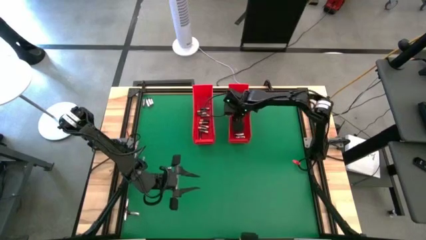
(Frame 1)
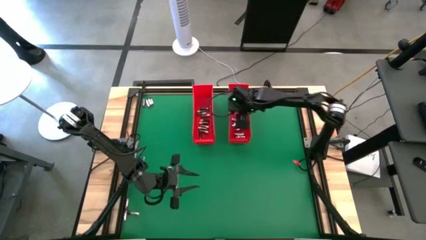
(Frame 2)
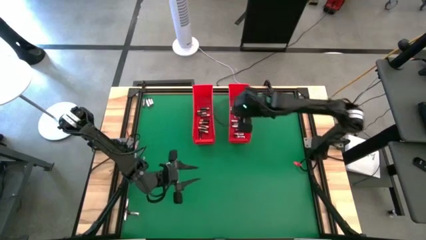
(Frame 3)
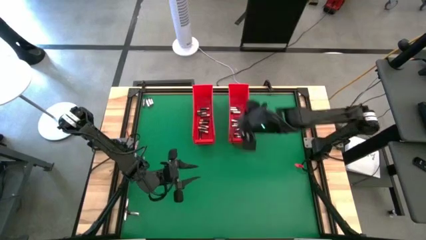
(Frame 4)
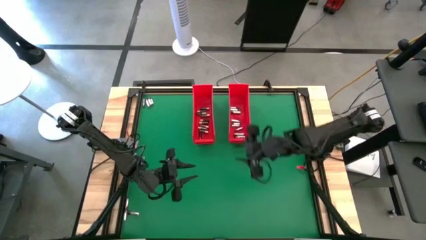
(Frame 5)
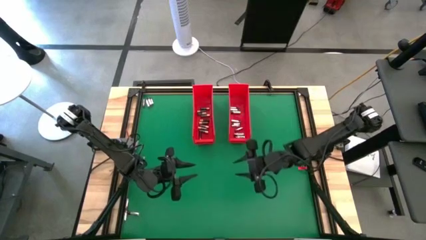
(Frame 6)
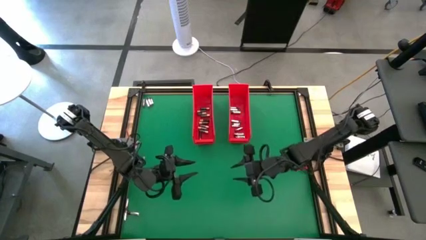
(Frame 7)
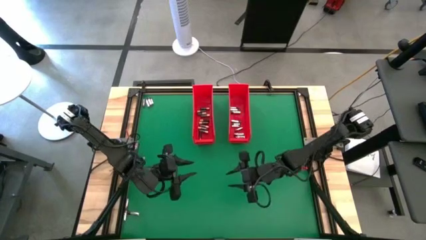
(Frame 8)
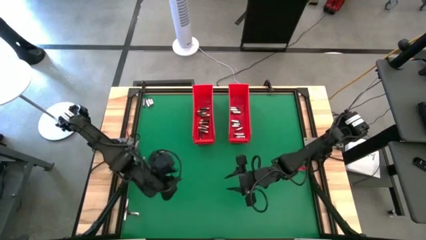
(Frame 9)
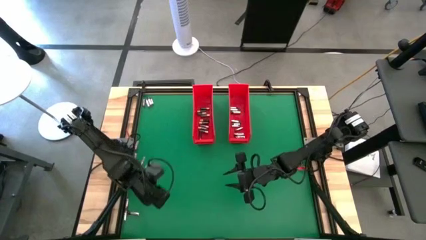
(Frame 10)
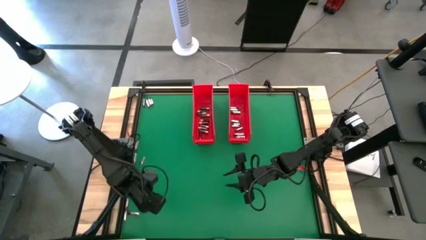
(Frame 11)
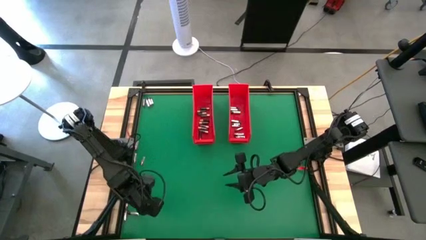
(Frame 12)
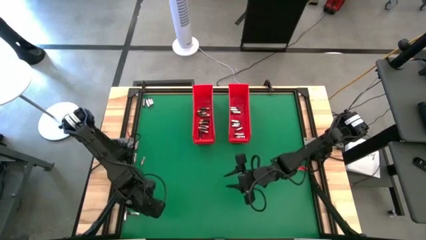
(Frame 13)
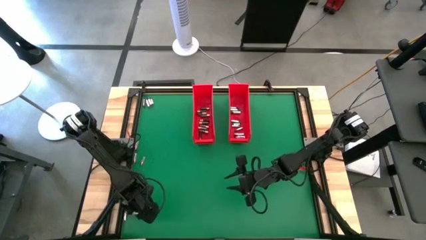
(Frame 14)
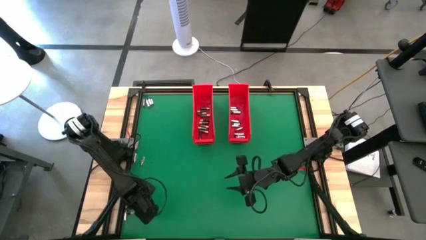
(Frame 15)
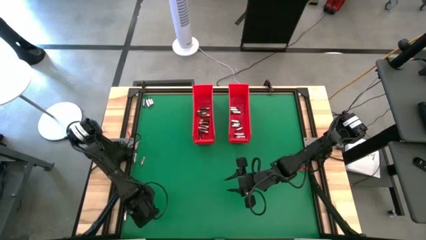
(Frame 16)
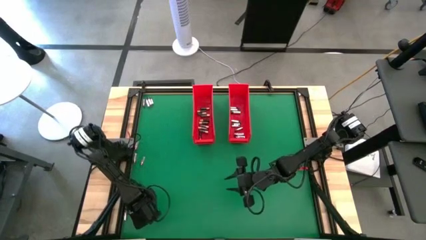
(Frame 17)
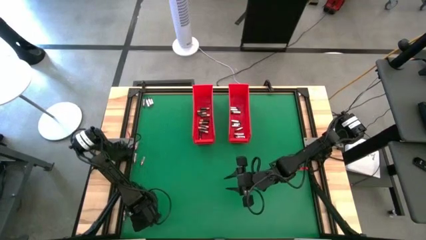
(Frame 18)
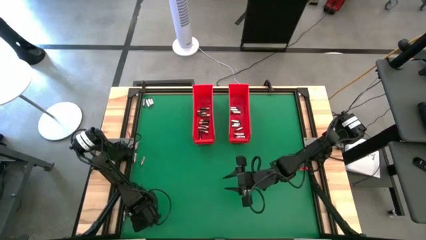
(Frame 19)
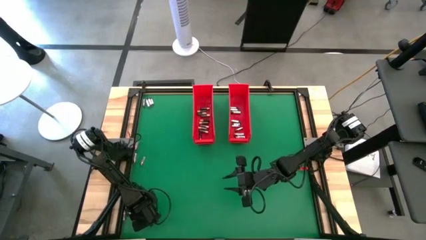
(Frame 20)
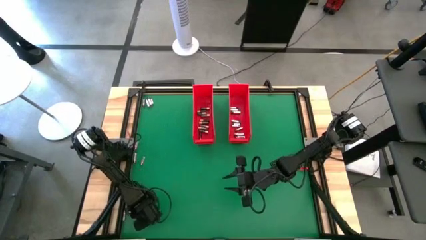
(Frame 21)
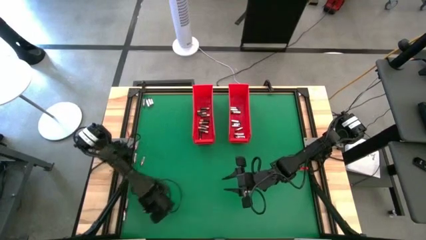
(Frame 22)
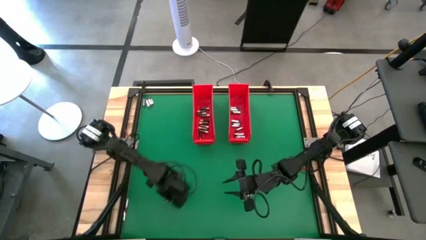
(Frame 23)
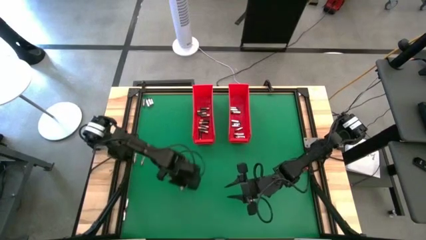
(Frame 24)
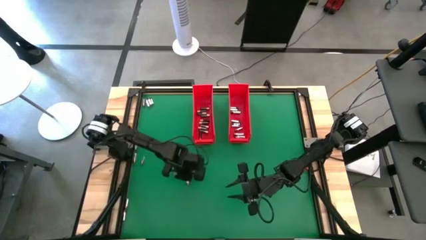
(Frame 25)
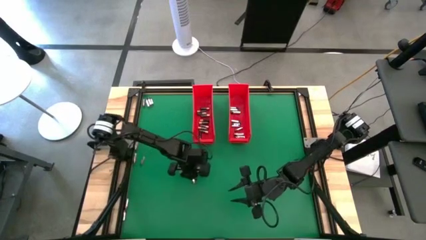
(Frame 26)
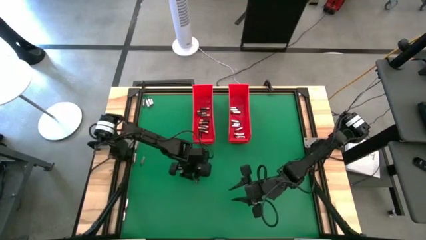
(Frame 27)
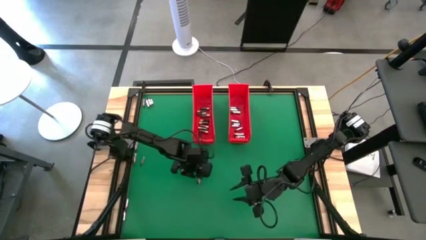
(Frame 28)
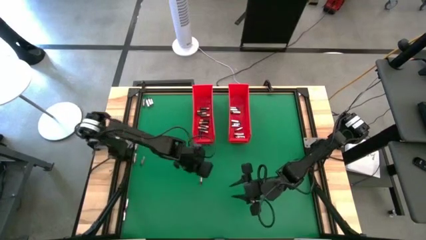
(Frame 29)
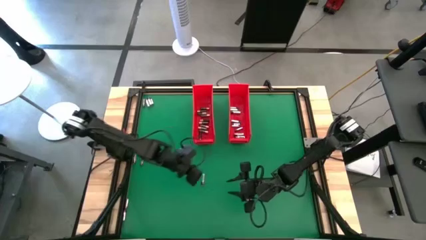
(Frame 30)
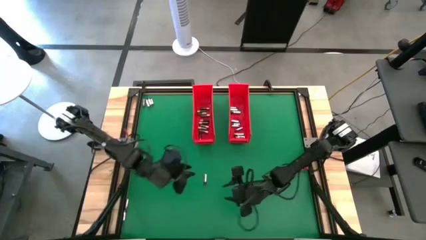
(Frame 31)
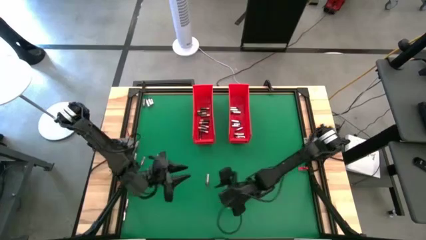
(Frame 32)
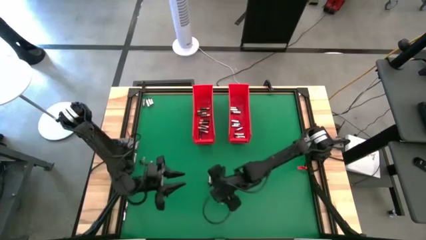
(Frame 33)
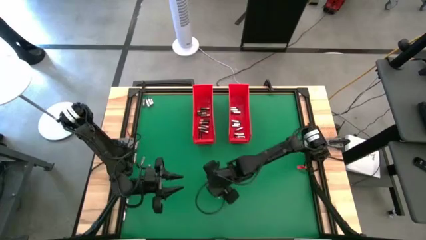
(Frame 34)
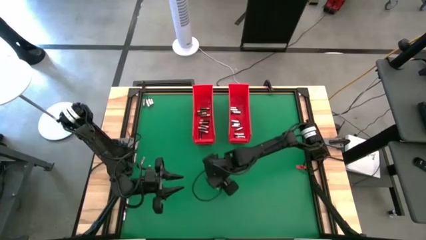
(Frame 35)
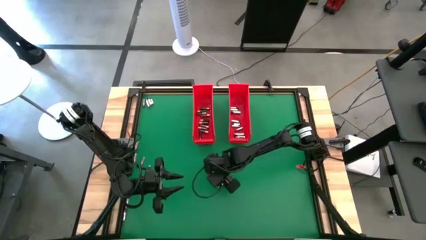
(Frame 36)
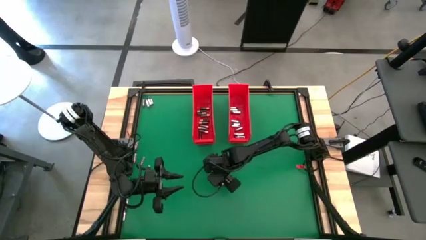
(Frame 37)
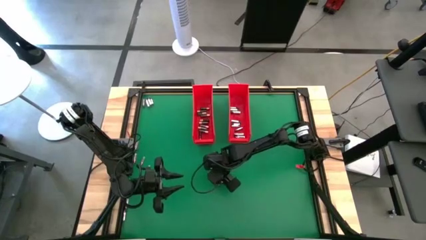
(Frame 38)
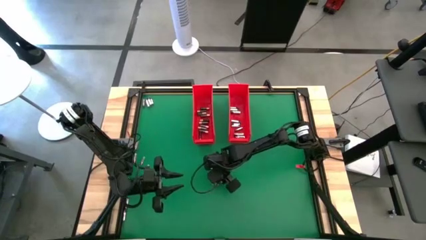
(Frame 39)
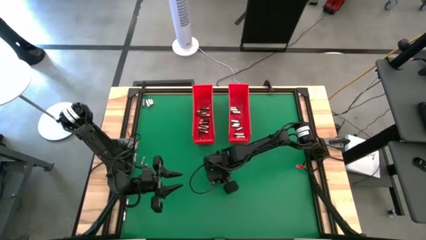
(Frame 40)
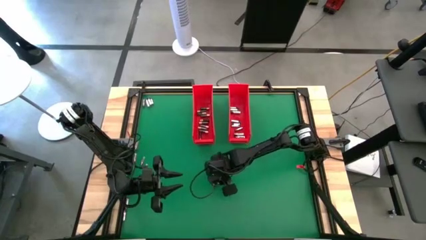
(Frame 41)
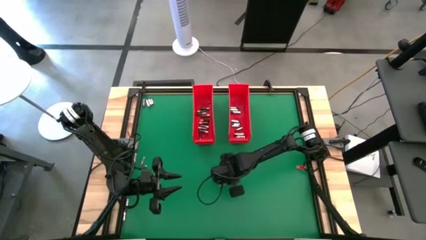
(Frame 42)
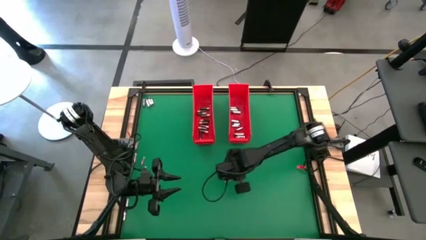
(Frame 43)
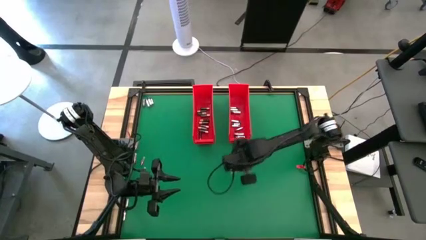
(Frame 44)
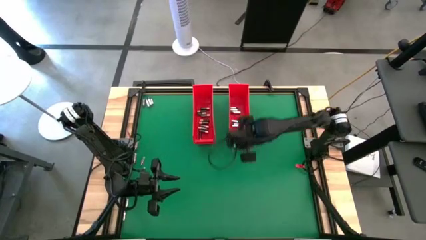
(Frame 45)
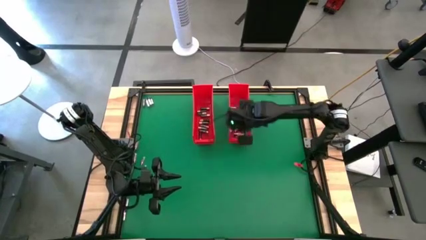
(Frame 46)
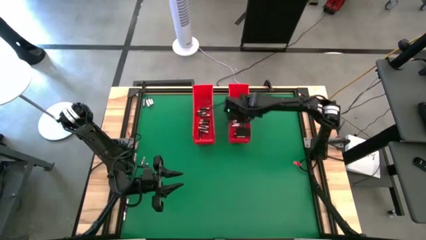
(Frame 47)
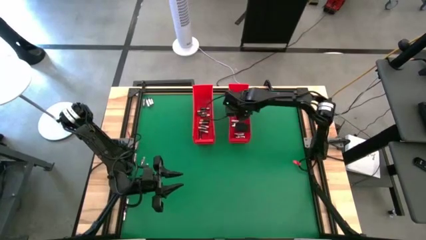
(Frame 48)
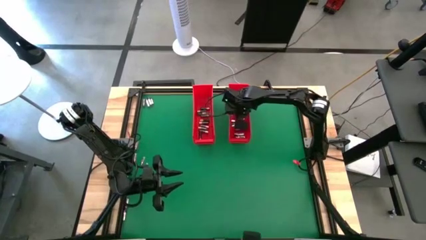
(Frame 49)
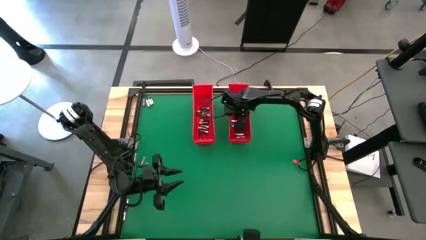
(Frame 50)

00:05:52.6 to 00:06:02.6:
Task: Sort batteries
Put the silver battery into the right red bin

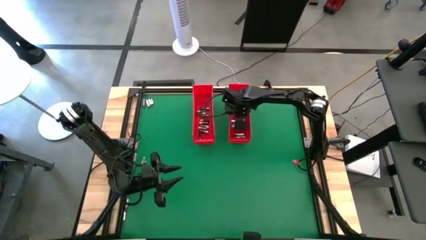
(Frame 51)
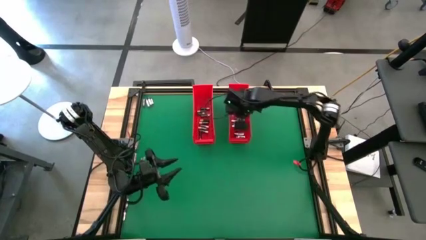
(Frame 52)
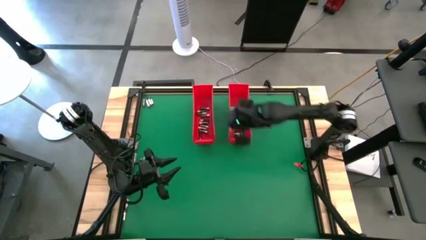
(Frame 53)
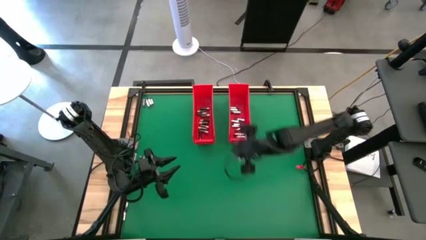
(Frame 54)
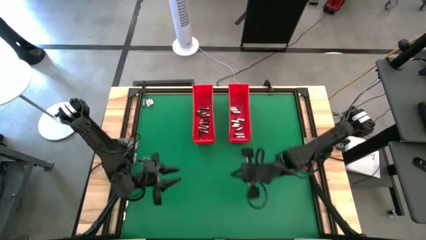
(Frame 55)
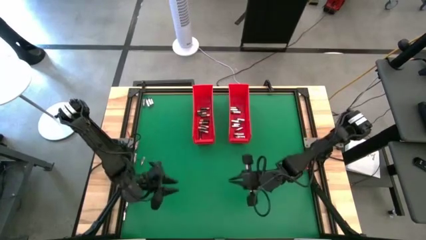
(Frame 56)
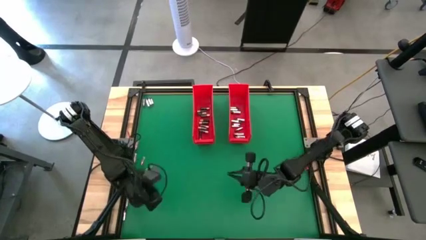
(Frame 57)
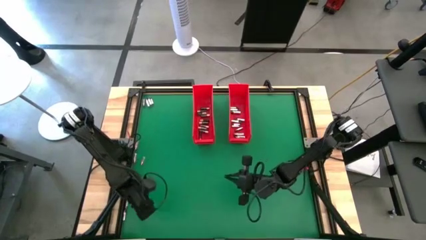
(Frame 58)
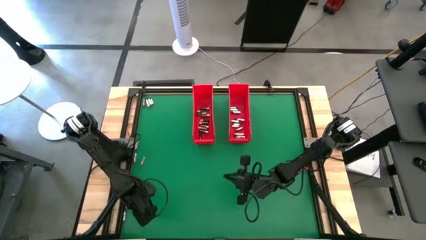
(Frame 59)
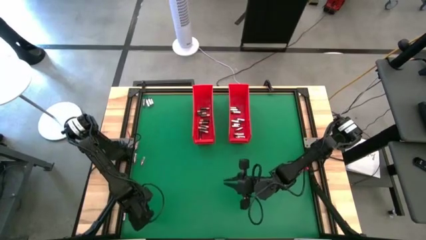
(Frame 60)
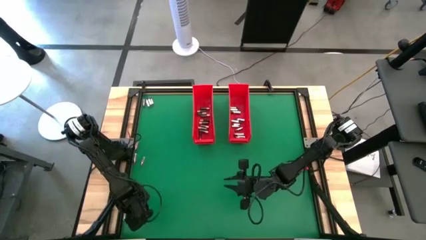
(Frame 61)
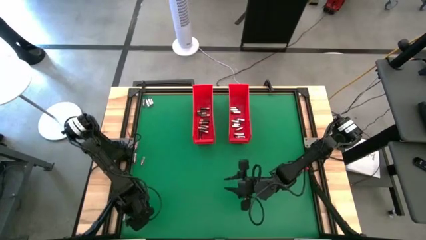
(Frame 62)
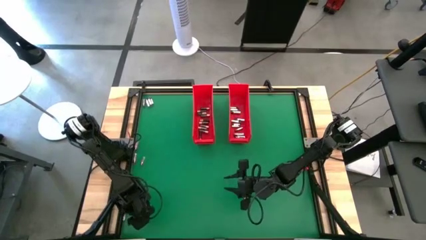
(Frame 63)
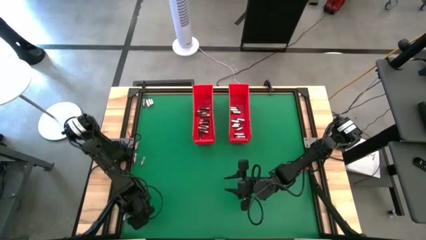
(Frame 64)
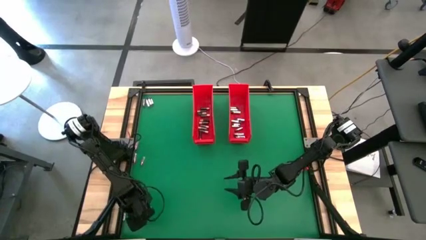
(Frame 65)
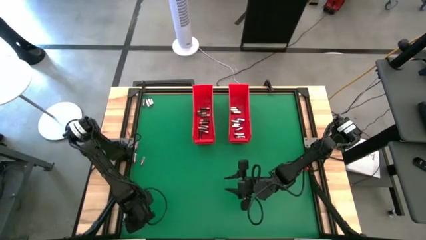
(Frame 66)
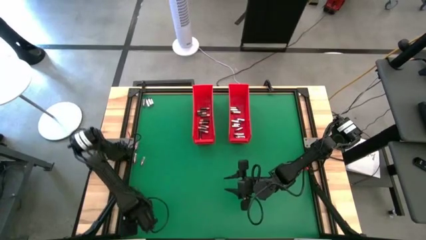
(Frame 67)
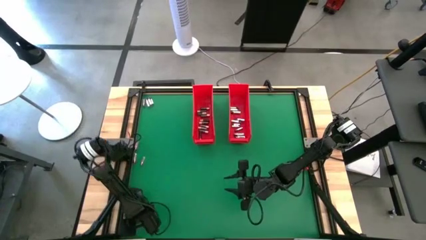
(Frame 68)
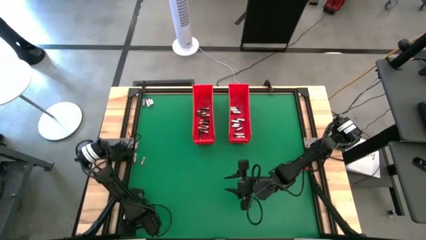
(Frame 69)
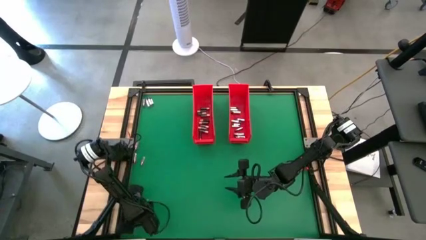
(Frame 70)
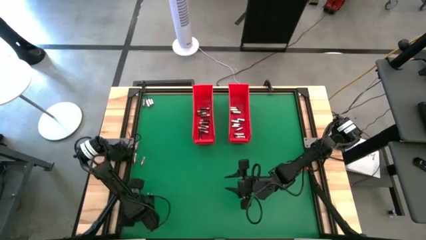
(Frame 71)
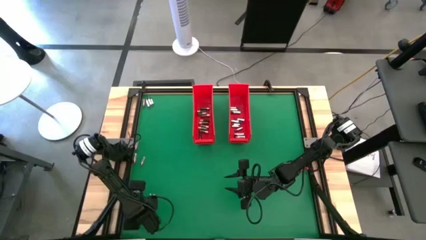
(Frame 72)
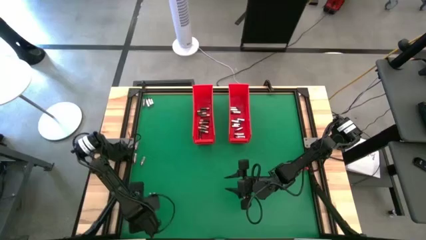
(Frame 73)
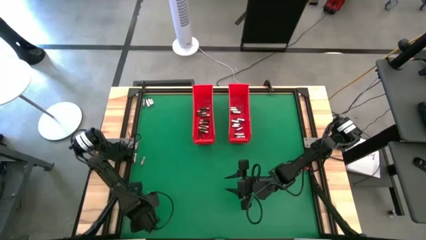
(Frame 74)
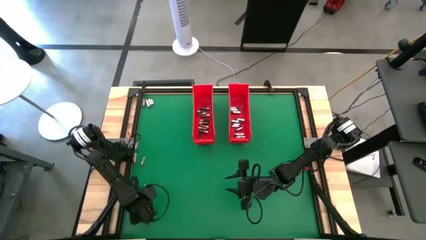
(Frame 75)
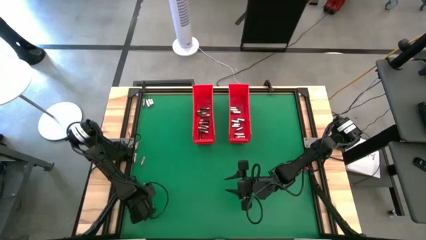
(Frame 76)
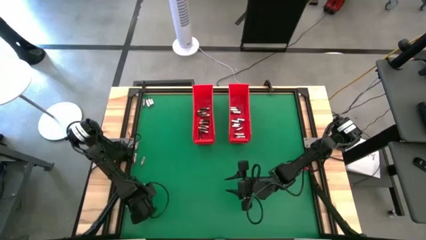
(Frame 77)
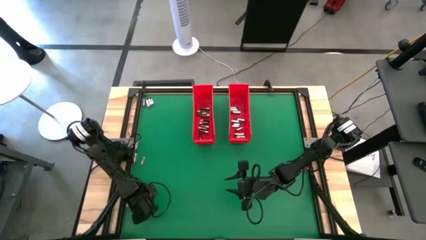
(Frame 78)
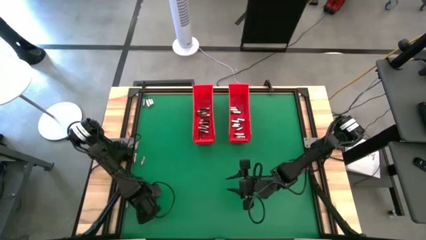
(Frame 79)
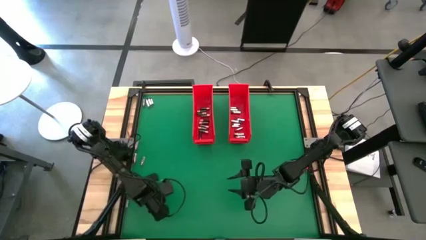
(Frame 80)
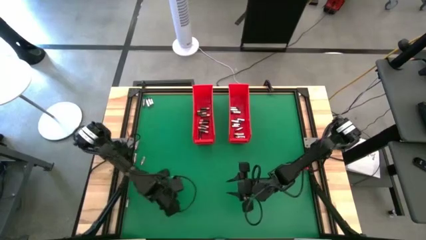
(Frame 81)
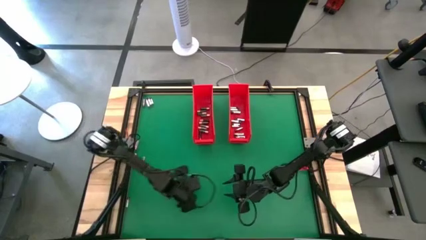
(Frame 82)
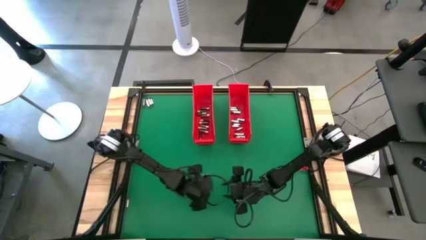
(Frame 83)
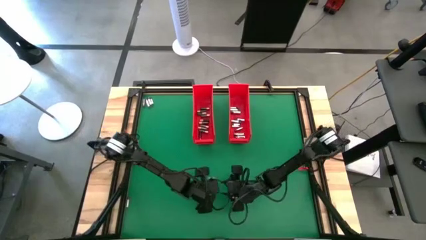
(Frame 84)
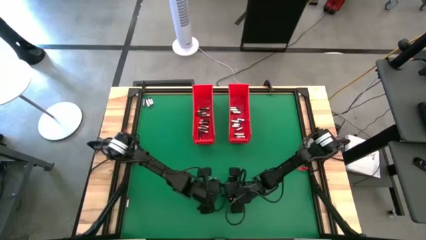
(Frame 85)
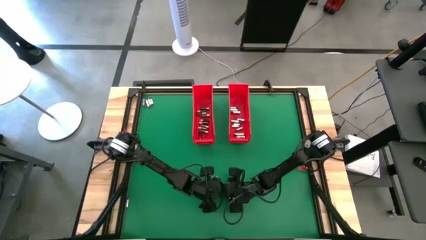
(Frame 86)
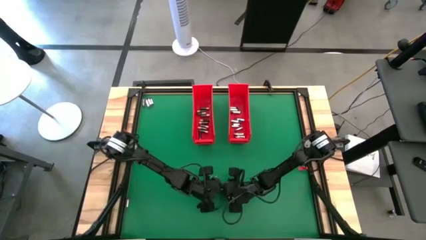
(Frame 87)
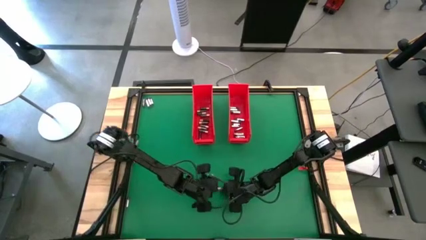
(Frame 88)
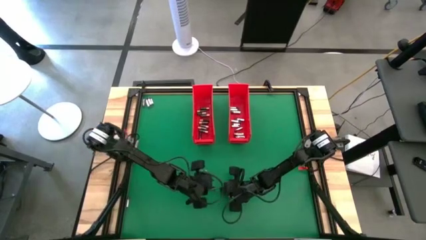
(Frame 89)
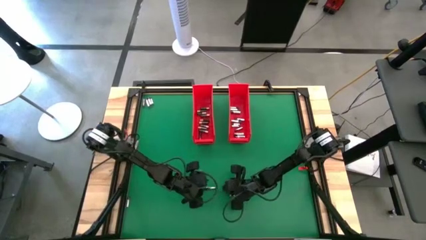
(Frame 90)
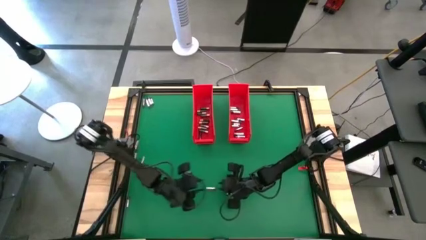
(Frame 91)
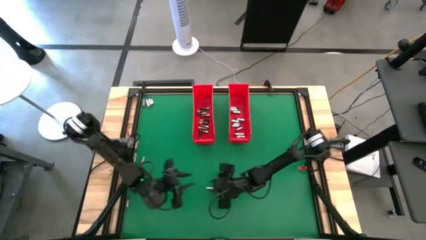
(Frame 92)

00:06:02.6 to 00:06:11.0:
Put the silver battery into the right red bin
